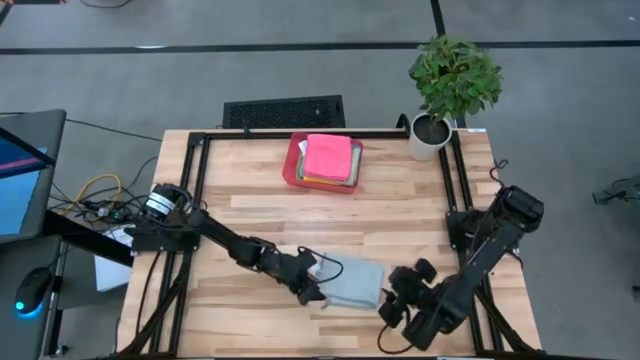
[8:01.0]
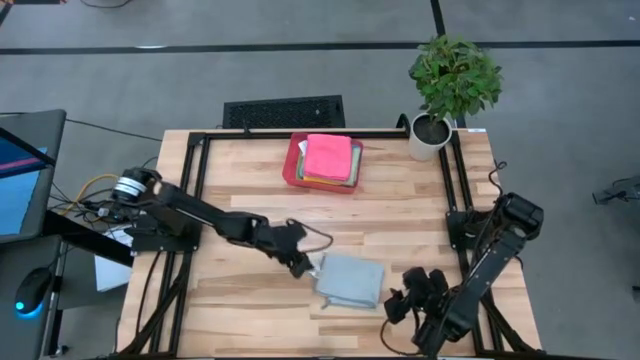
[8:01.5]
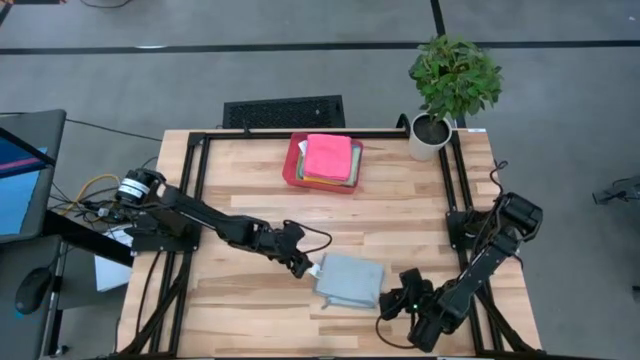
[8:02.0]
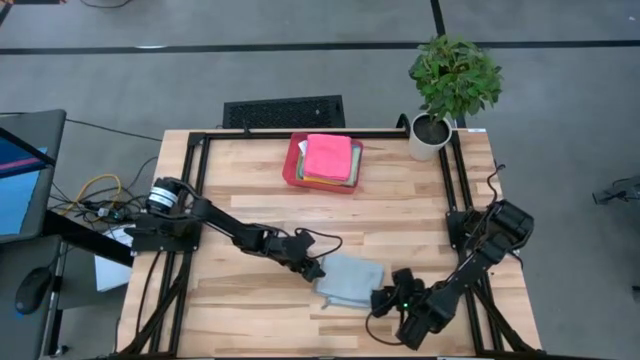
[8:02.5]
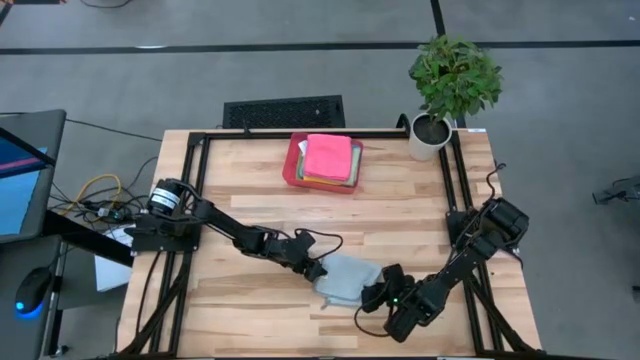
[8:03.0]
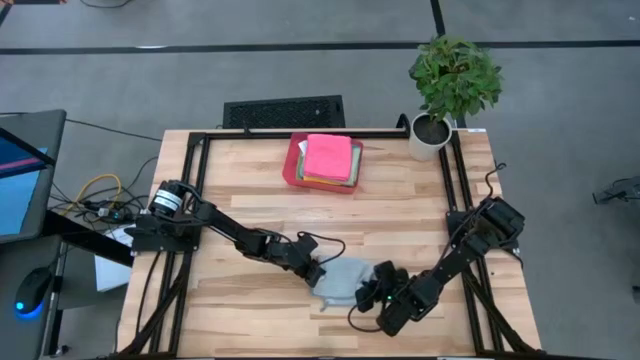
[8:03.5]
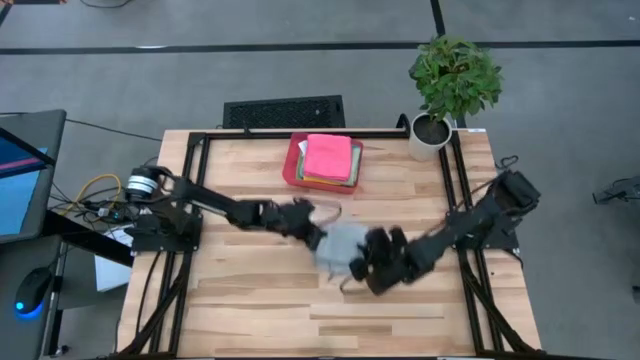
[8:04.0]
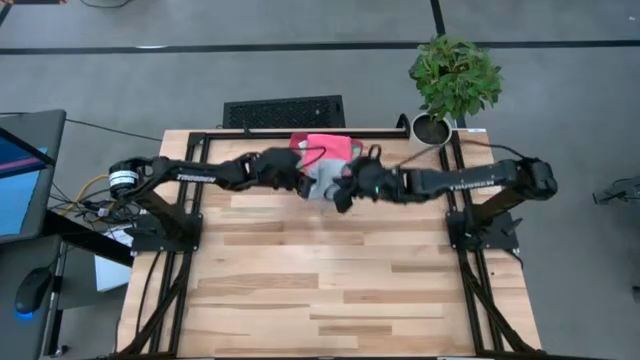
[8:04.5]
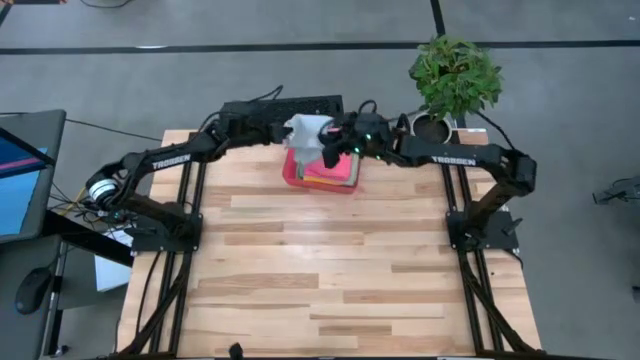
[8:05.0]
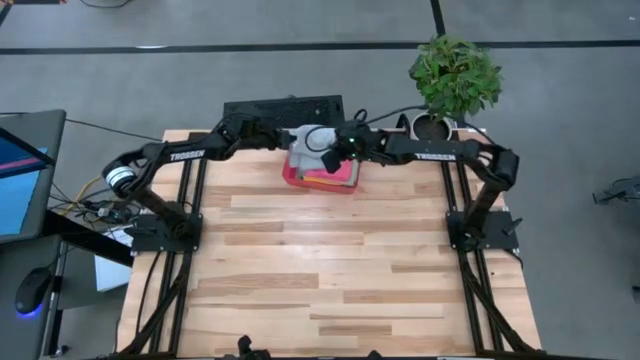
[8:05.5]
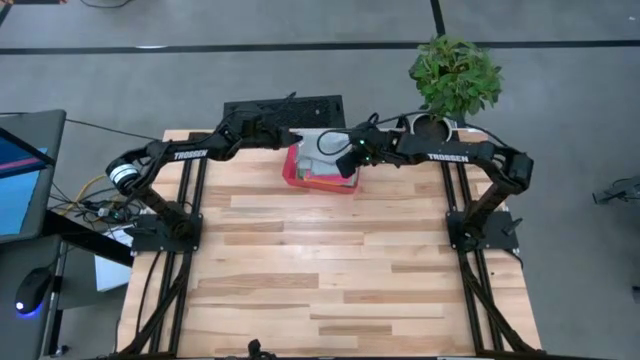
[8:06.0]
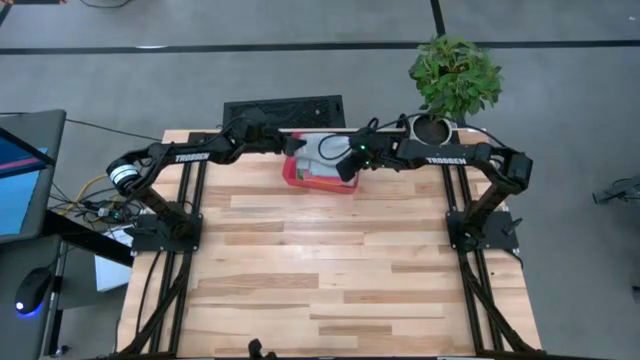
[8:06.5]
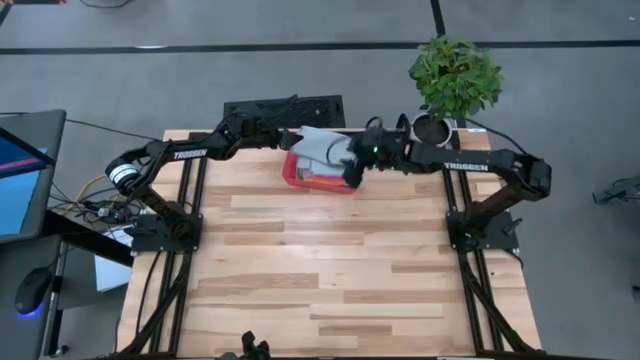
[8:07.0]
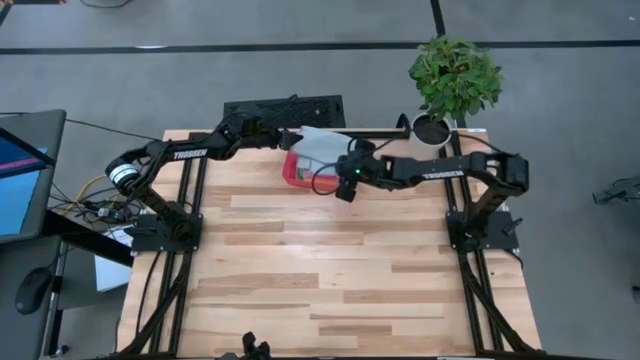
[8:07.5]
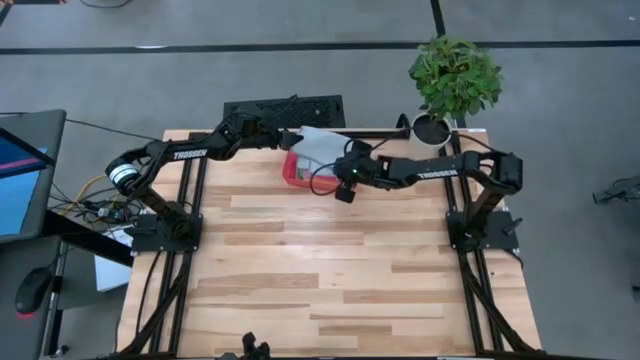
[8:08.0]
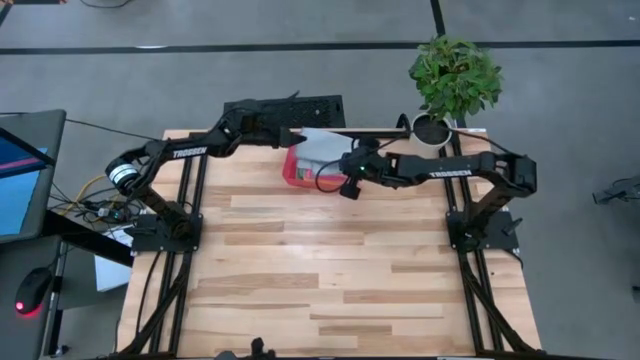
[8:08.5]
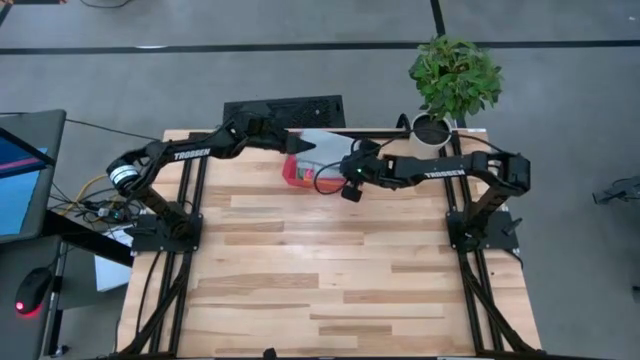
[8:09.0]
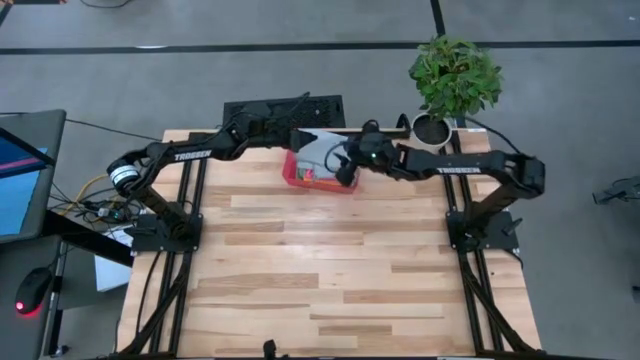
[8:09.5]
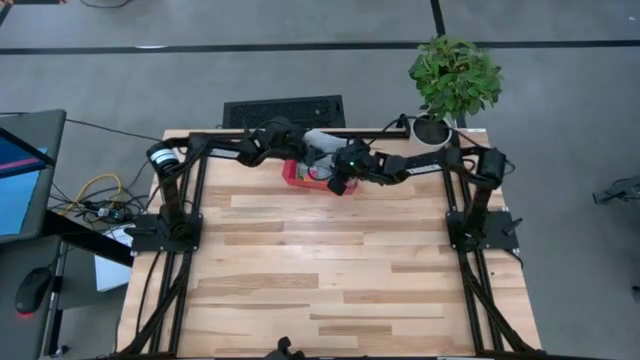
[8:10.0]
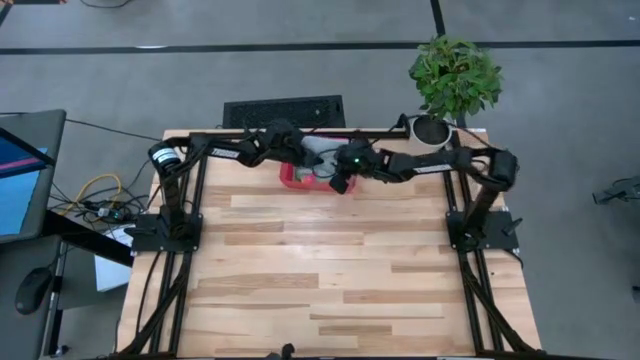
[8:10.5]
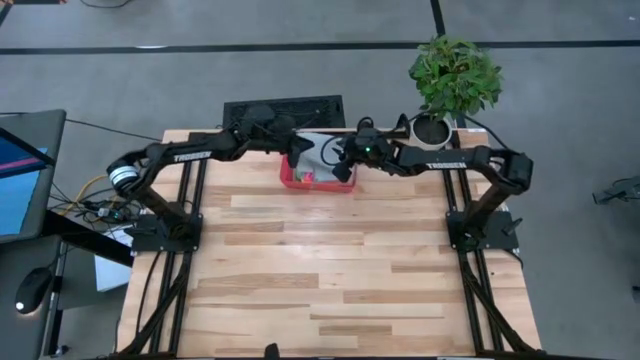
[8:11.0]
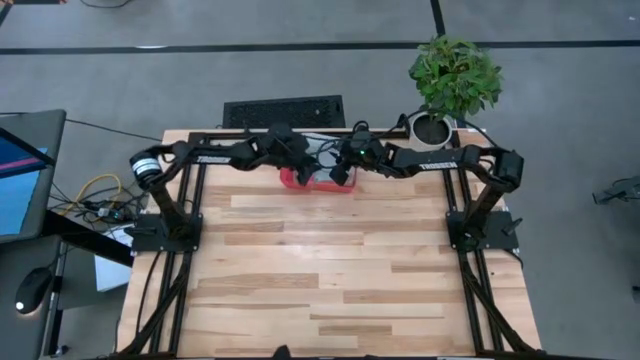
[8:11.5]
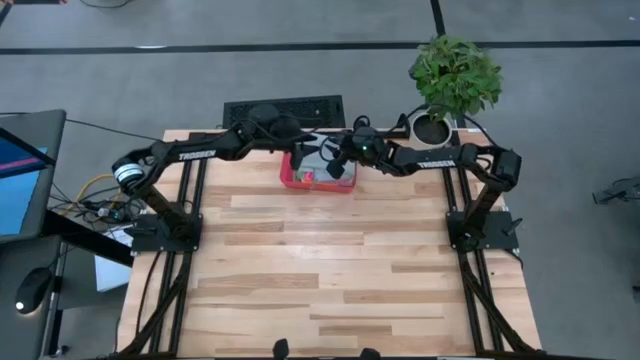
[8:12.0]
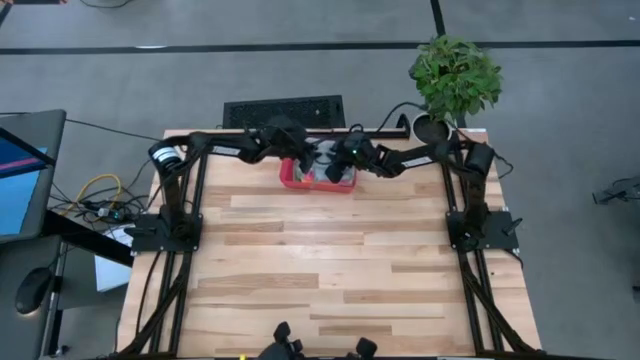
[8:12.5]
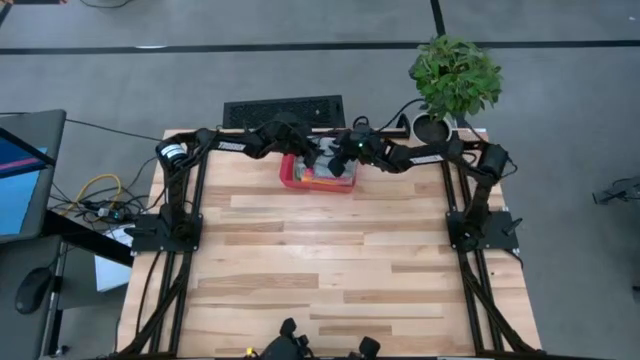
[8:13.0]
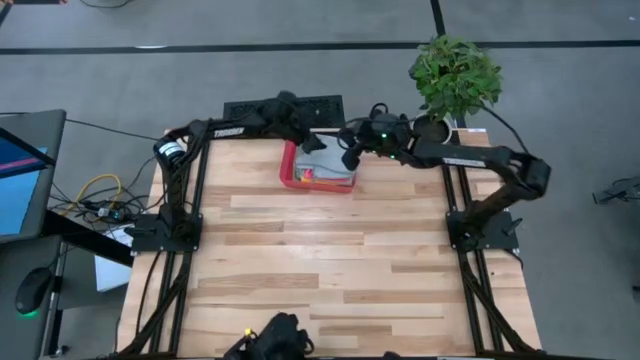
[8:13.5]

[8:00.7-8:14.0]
Task: Fold microfiber towels
Stack the gray microfiber cloth on top of the pink microfiber cloth in the red bin

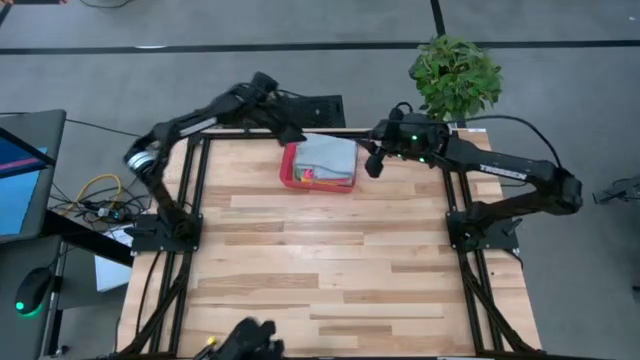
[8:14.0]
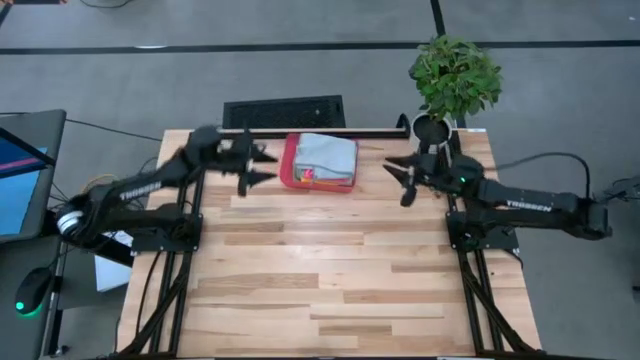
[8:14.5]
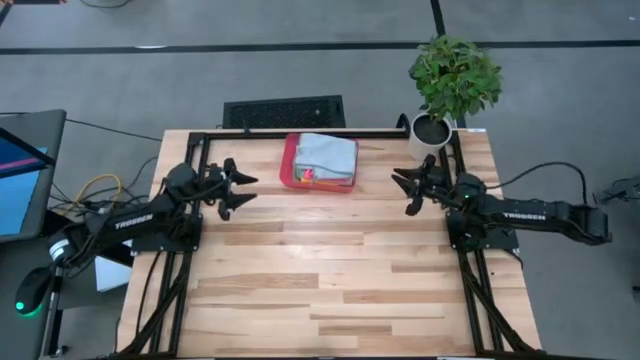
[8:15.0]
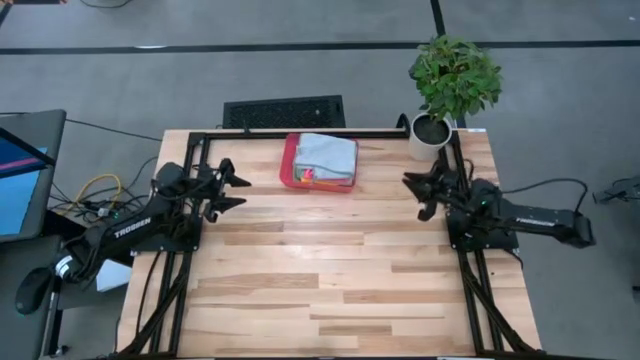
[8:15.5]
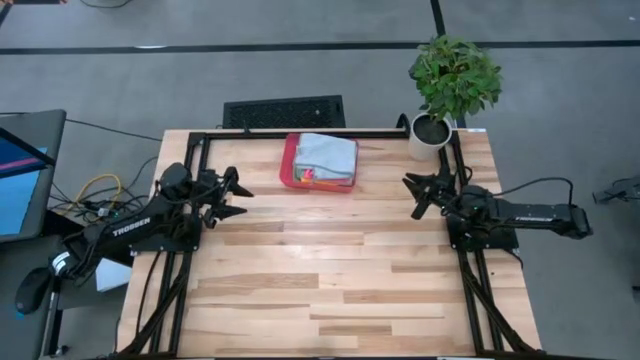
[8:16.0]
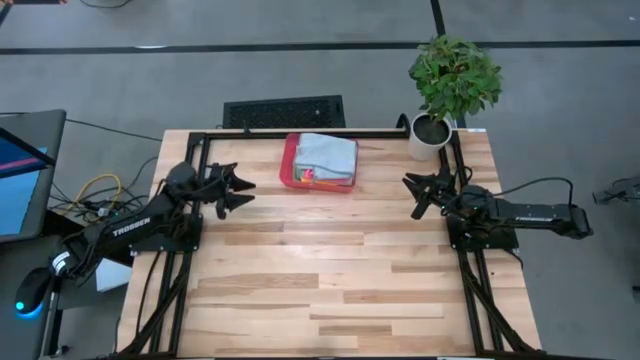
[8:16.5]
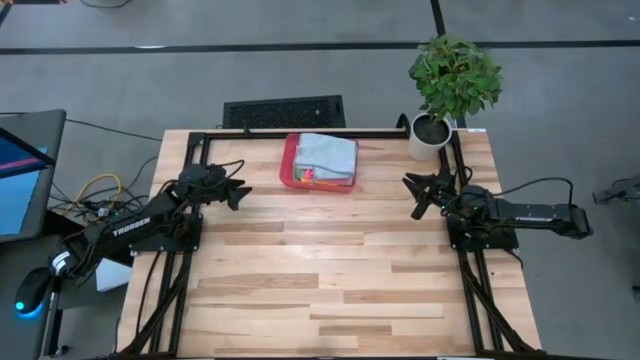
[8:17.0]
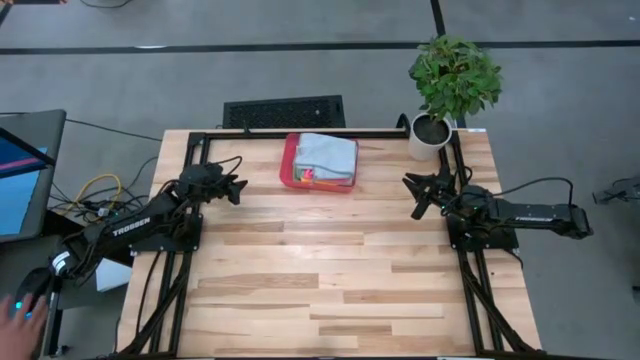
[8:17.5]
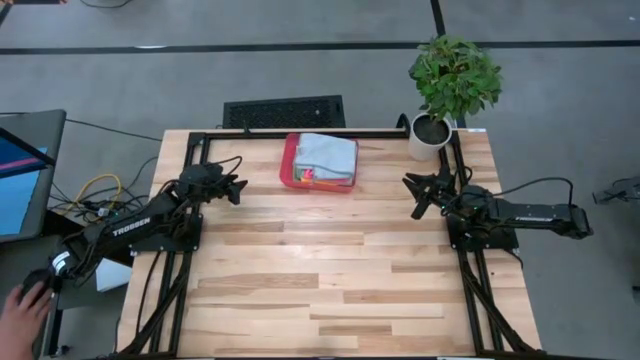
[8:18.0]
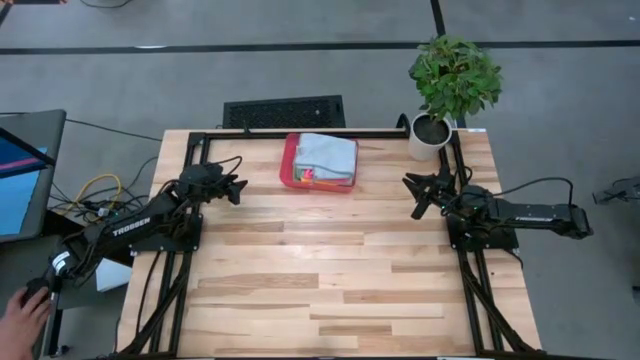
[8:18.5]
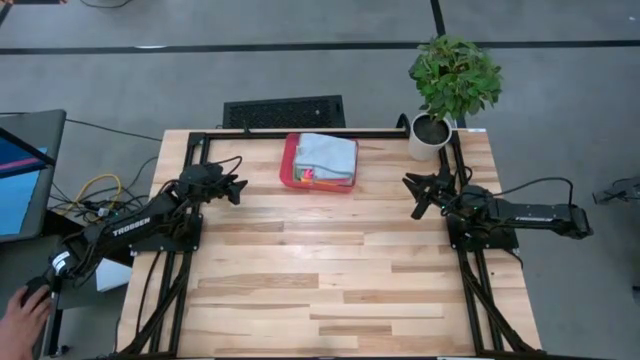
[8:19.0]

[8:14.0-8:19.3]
Return to home position

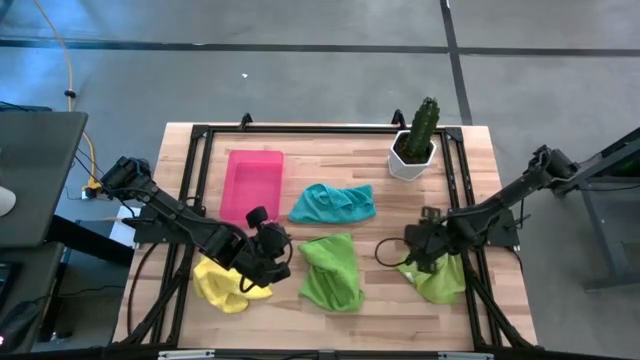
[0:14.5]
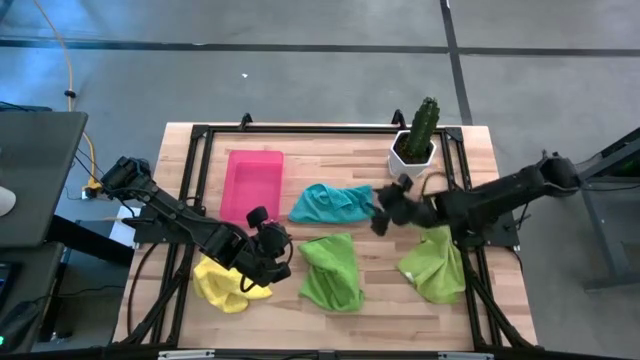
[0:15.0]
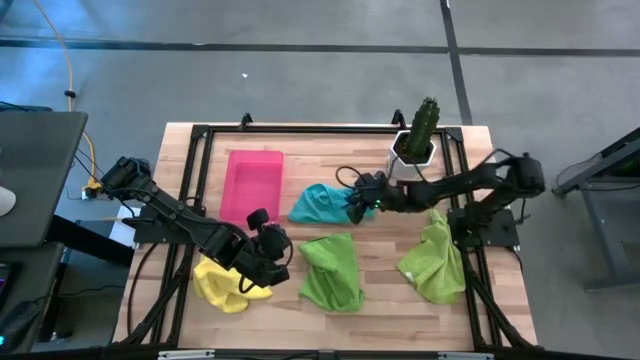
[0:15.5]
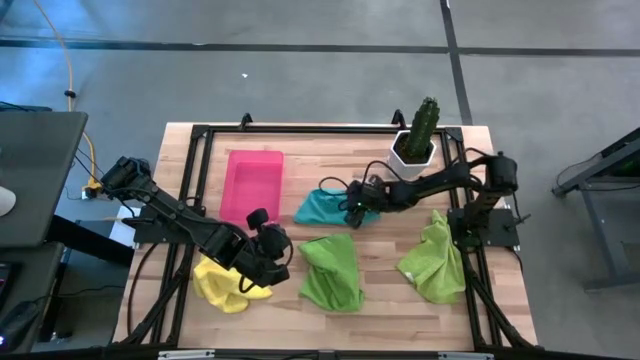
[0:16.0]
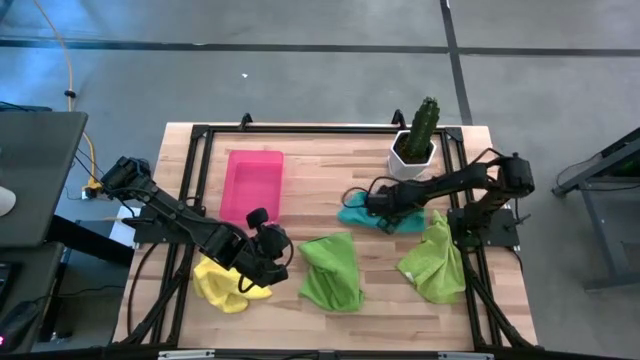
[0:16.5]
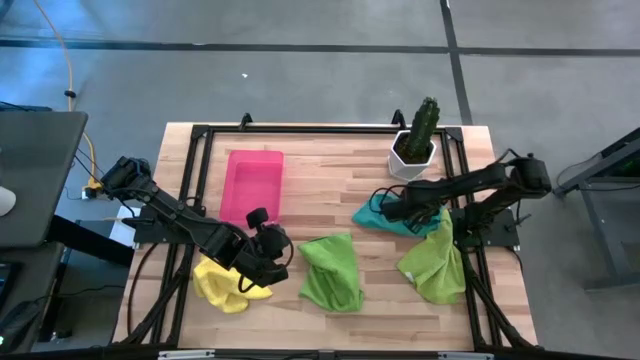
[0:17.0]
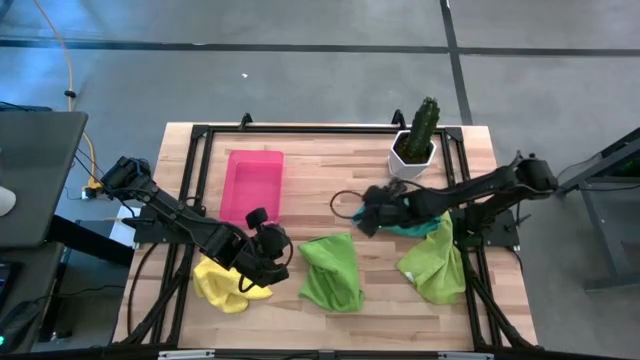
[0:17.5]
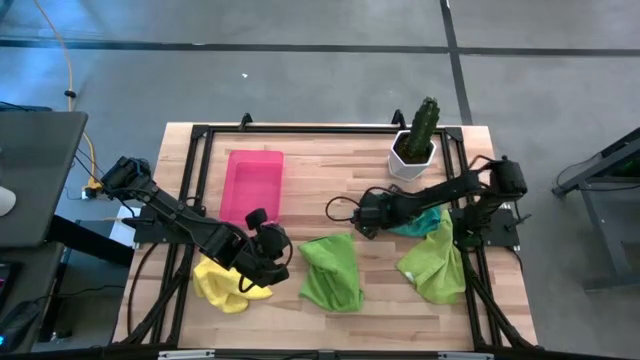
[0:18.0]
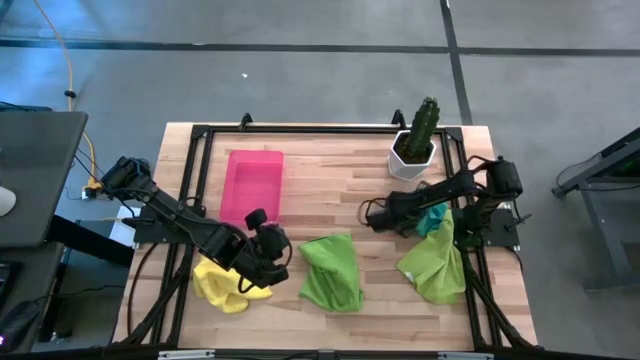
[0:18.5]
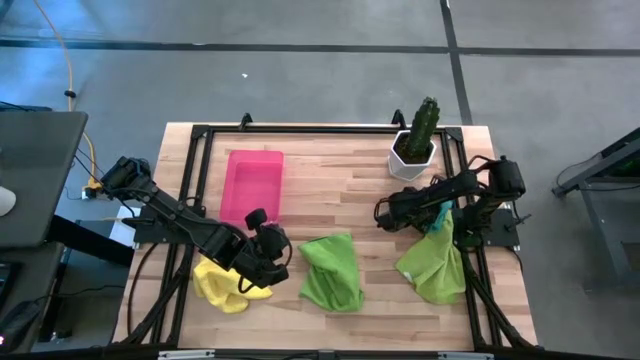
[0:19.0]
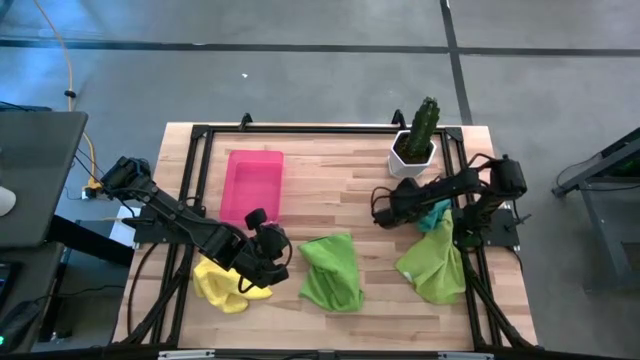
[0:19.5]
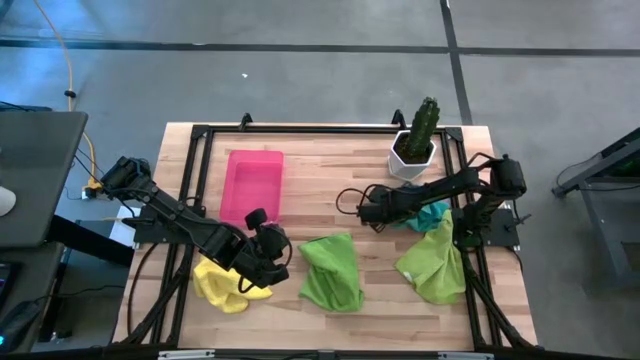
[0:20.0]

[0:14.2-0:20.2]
Task: Roll microfiber towels into tight, uniform cylinder then place into a basket
Move the blue microfiber cloth to the middle right of the table
